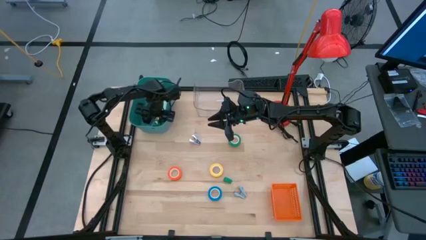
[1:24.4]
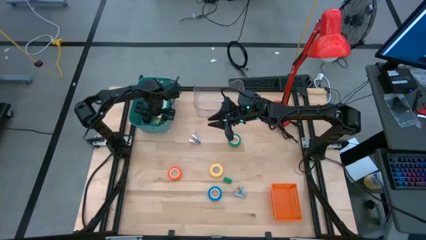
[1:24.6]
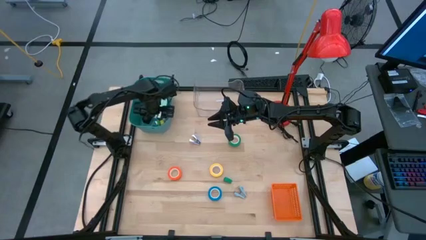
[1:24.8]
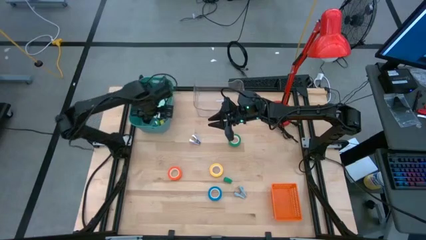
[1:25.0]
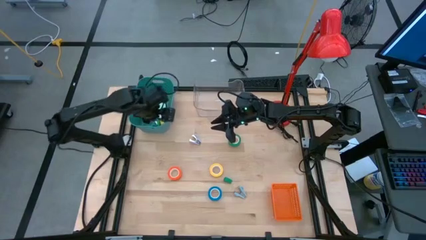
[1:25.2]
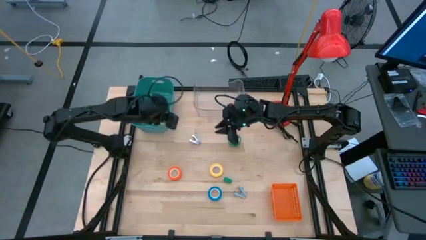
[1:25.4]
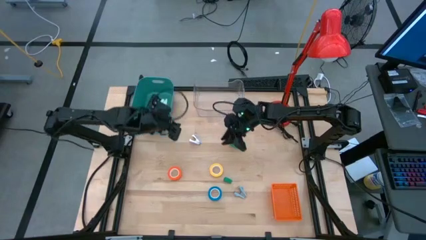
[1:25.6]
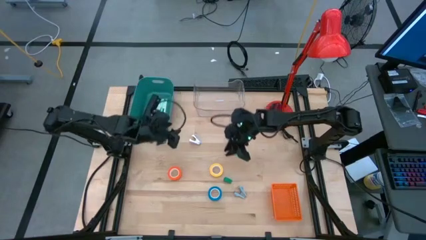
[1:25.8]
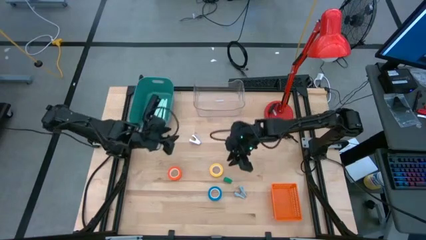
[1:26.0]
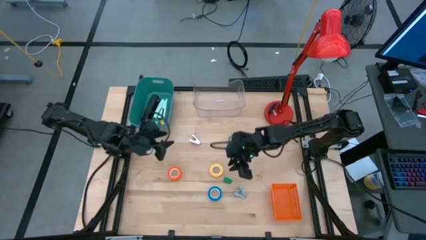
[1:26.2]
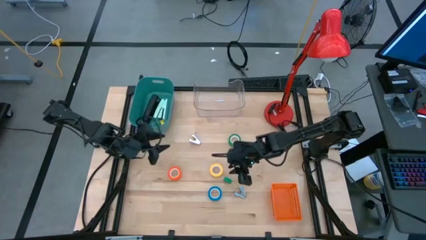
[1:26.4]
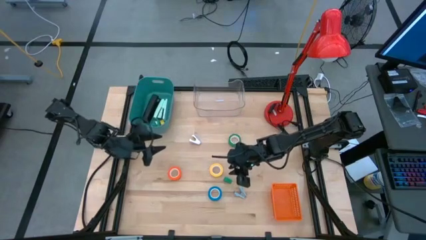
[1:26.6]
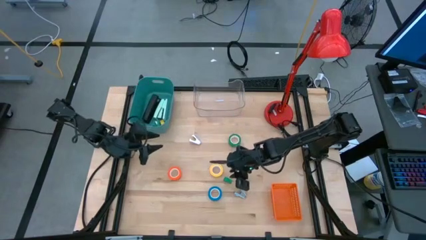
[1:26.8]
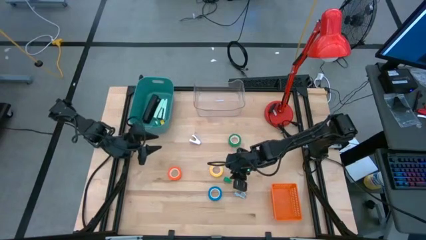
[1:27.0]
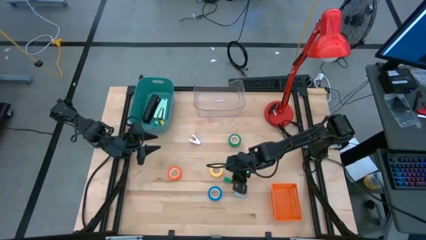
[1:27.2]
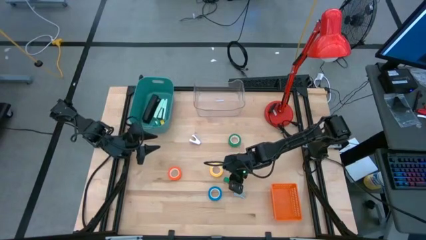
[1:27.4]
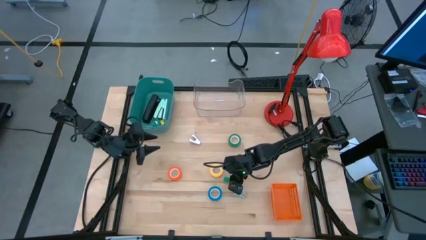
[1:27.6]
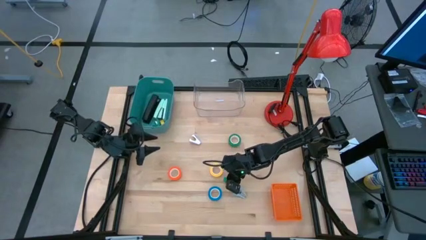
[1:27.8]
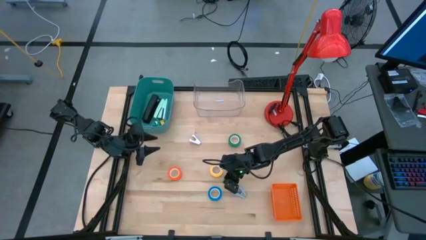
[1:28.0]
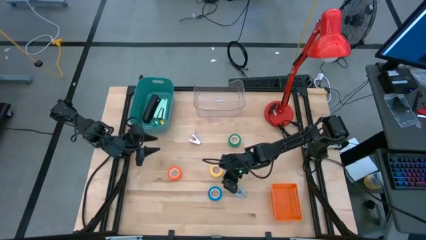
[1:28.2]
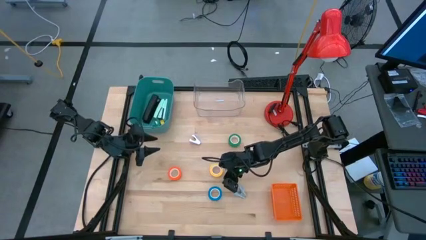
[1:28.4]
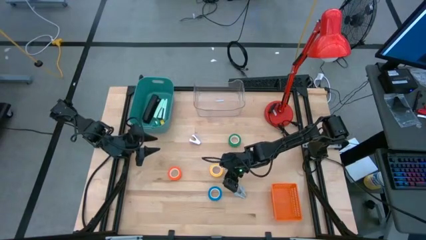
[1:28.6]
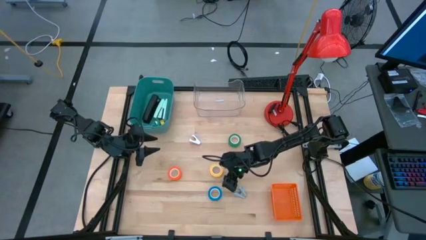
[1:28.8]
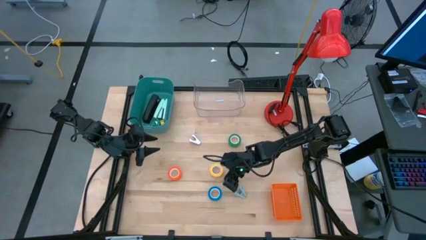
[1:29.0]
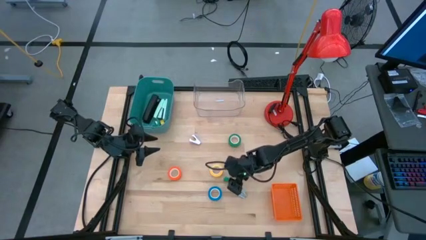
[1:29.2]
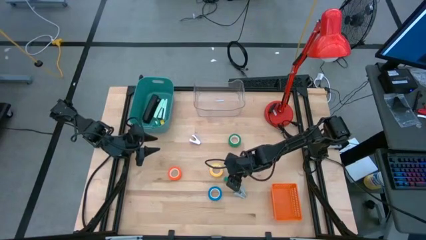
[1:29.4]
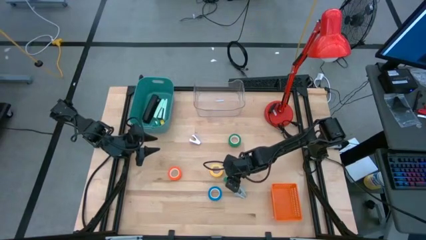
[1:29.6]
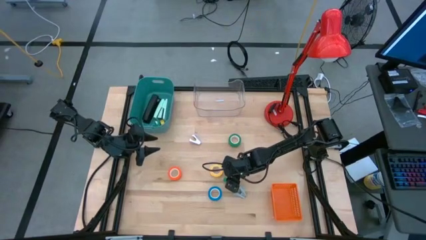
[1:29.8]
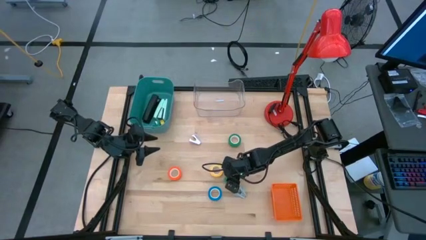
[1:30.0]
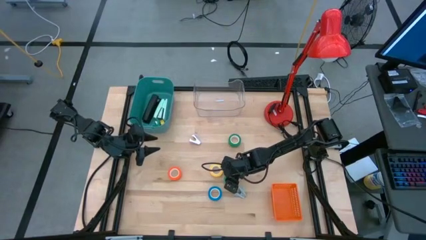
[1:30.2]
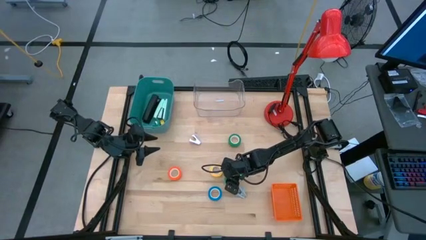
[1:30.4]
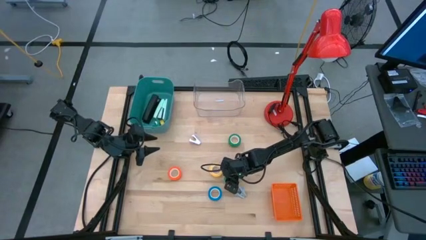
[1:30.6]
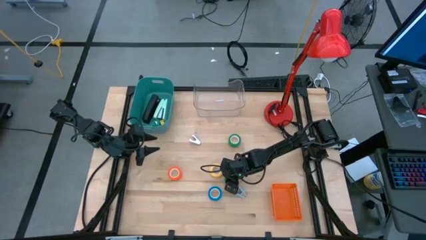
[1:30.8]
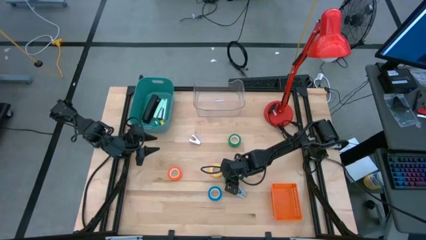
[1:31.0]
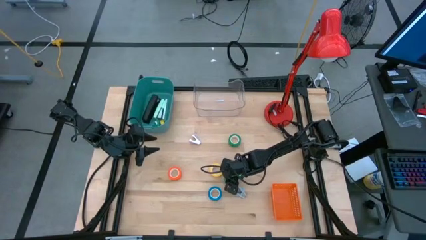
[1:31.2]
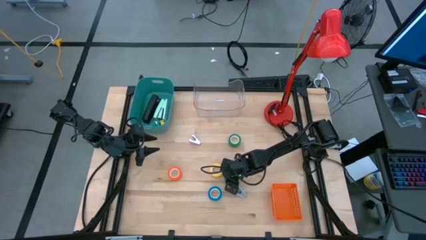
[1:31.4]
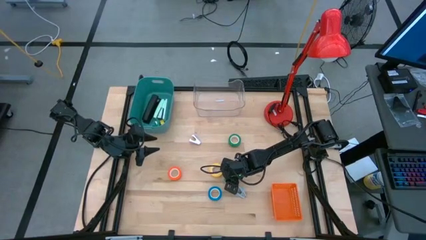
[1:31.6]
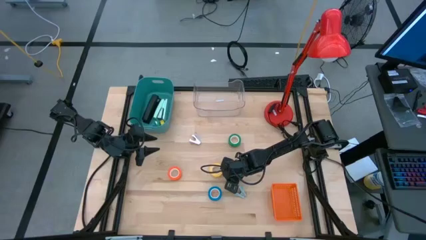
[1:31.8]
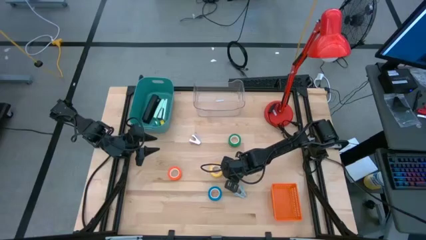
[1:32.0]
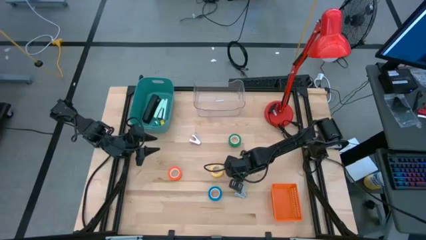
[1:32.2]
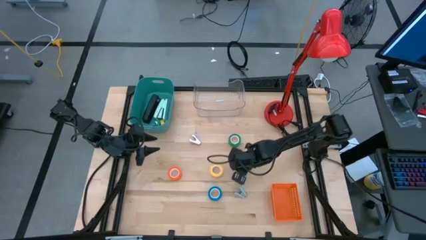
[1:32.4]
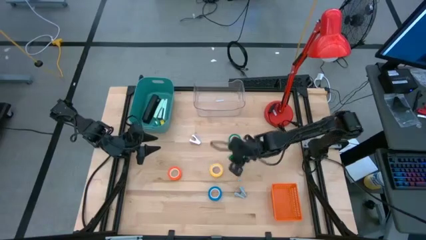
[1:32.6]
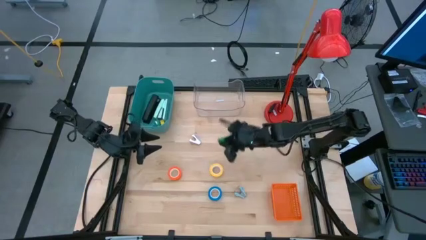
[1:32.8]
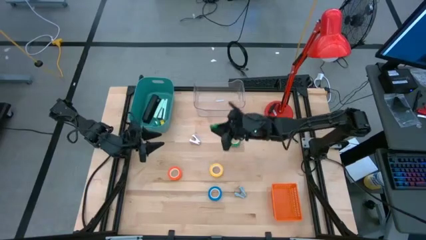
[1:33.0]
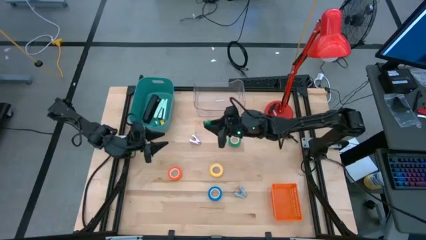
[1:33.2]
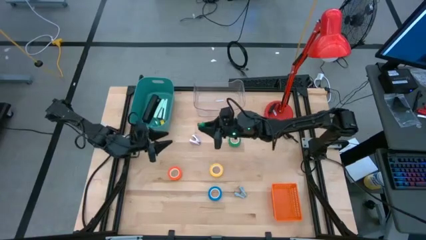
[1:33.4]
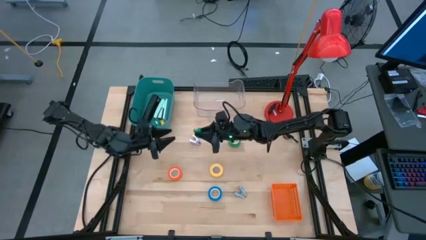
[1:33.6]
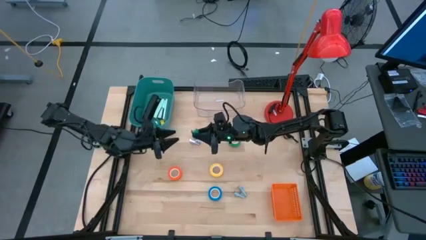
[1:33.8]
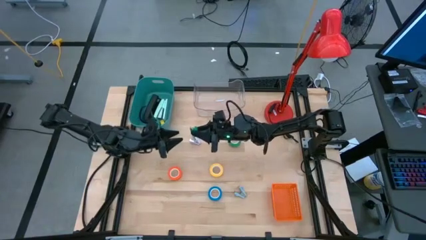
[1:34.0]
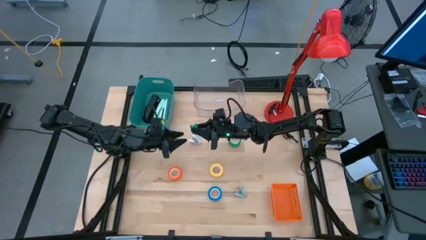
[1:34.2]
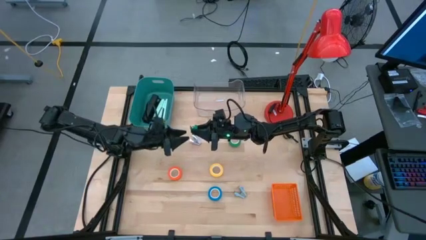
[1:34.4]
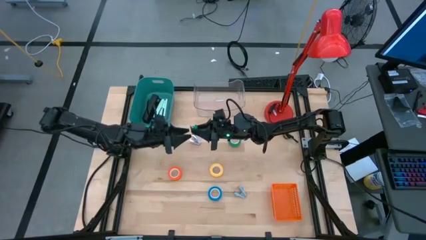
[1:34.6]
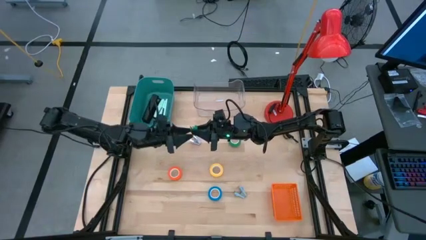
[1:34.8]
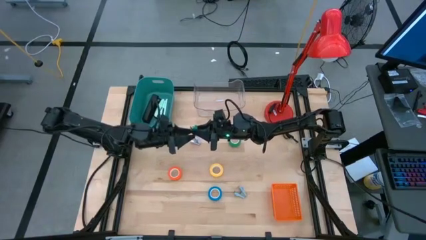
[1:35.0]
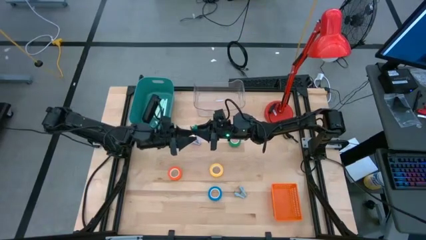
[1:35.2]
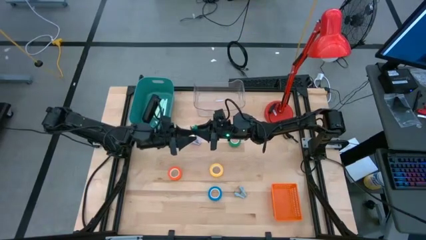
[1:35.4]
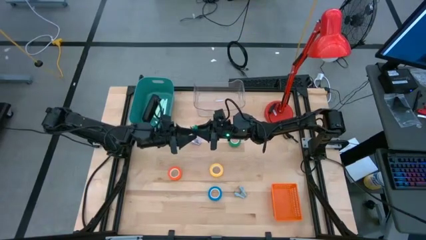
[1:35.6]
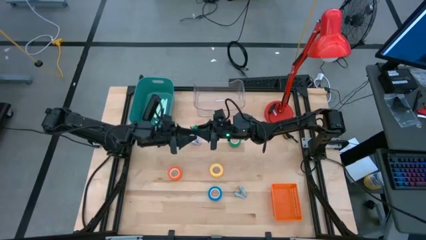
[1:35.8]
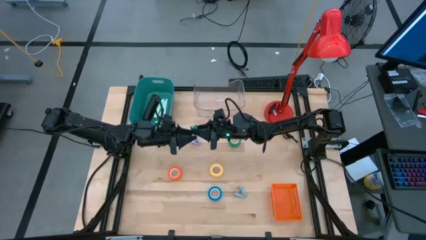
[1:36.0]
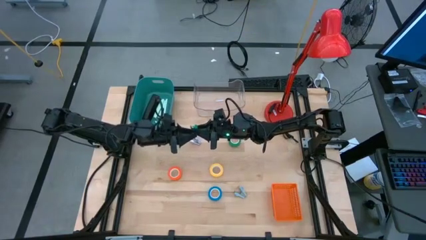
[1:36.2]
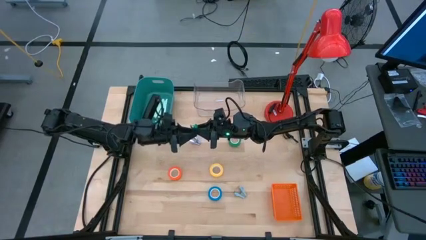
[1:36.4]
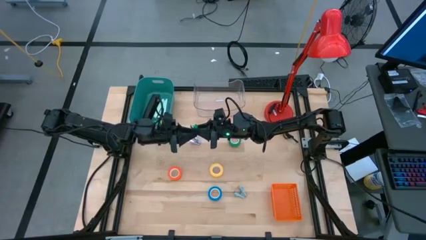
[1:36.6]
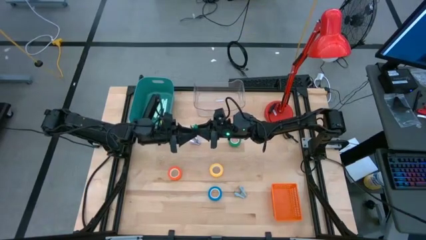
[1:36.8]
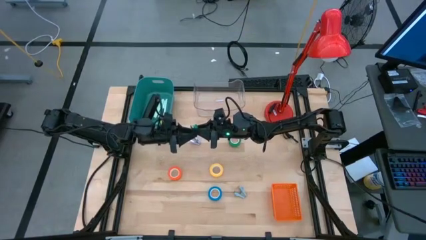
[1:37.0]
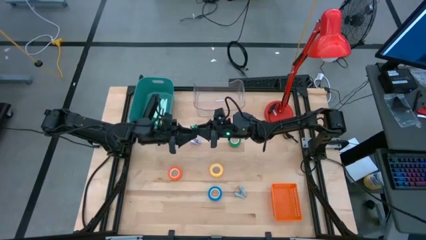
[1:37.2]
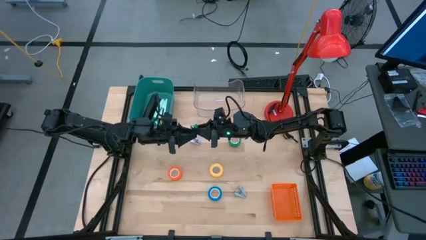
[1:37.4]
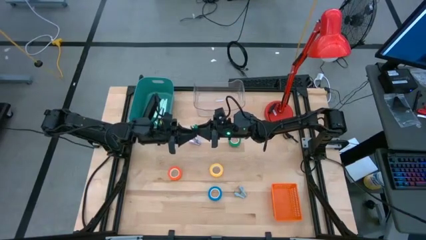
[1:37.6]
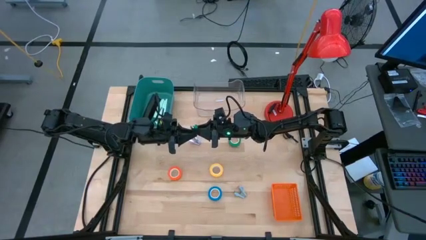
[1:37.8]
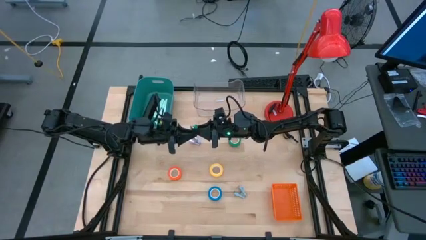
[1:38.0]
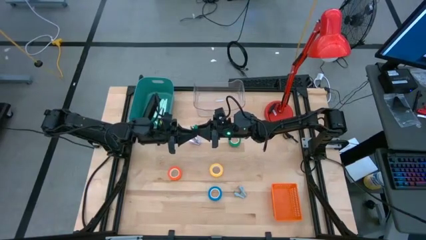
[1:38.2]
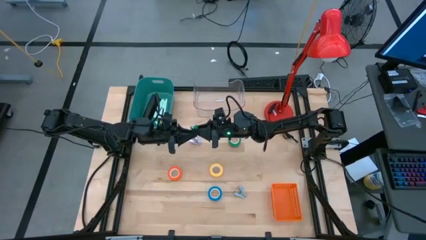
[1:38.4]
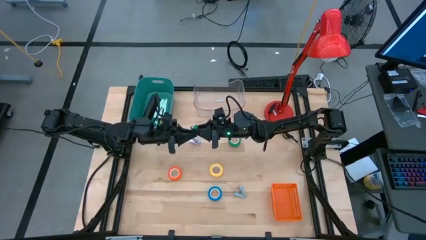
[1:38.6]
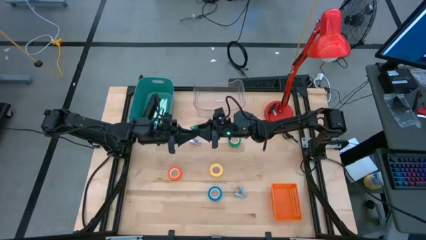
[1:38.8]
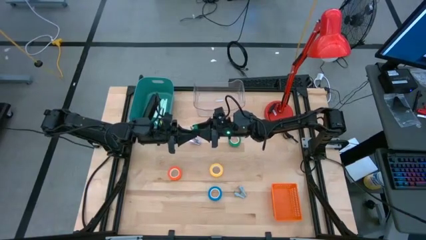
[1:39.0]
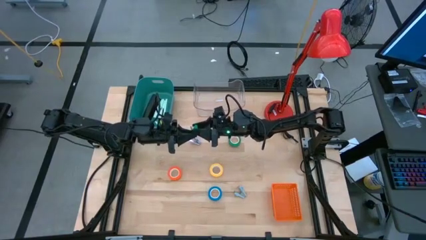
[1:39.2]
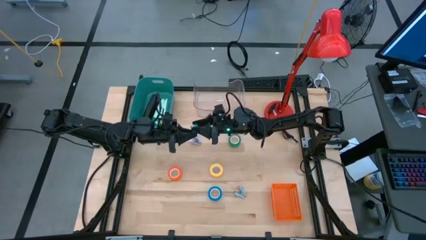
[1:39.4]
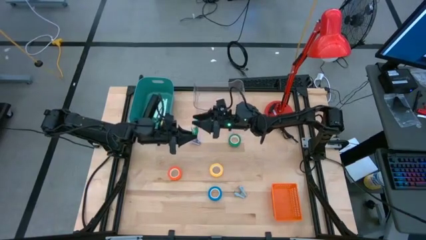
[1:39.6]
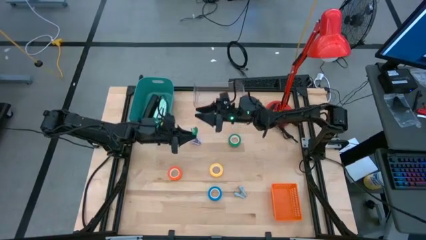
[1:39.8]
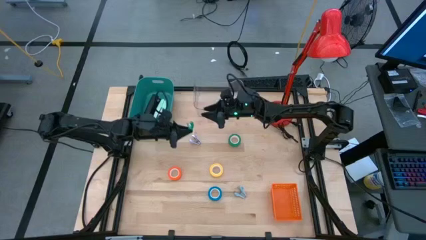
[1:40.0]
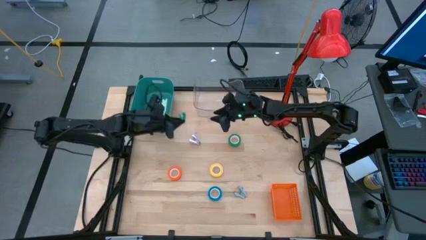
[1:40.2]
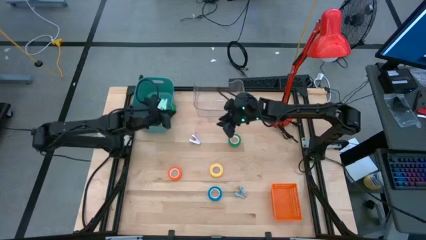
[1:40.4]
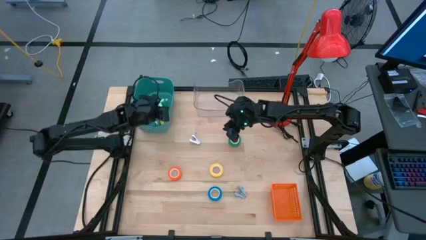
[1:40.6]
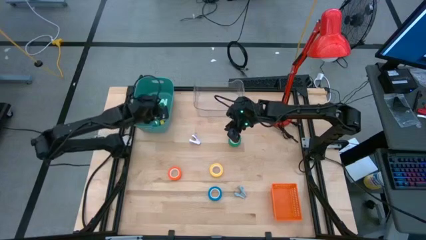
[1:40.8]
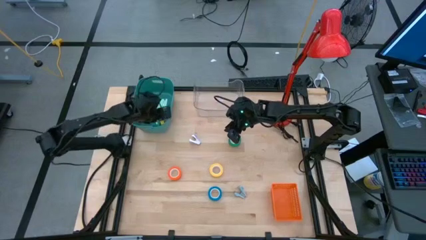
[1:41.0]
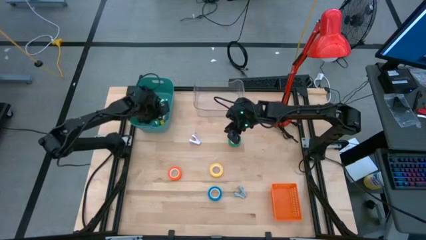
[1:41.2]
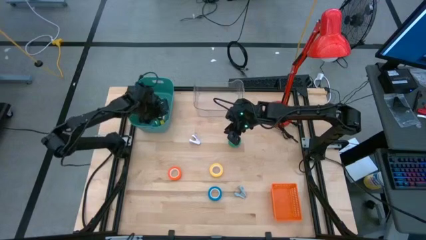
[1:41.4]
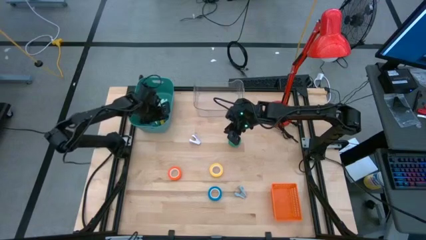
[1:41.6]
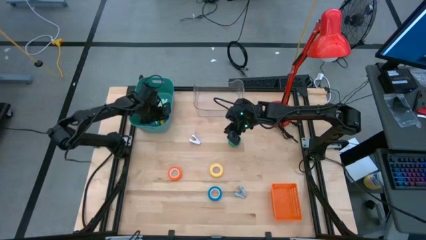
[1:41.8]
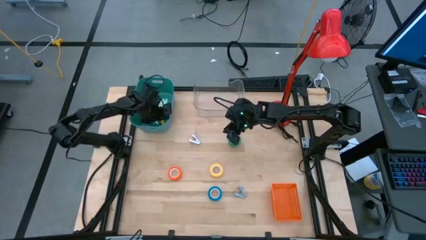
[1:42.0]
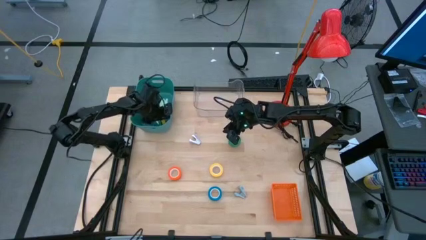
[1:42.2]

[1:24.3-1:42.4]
Task: Pick and place Stapler, Stapler remover, tape
Put the small green stapler into the green bin
